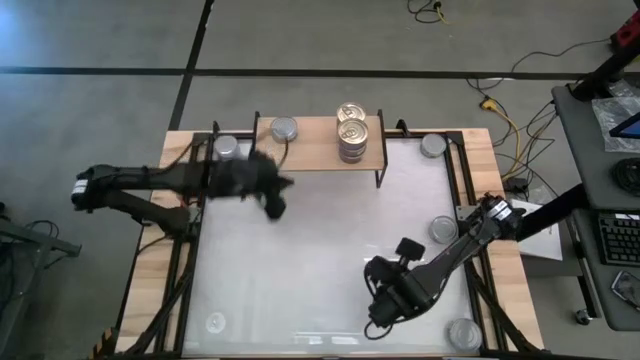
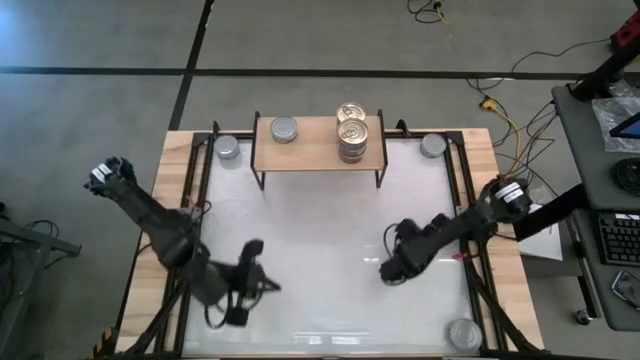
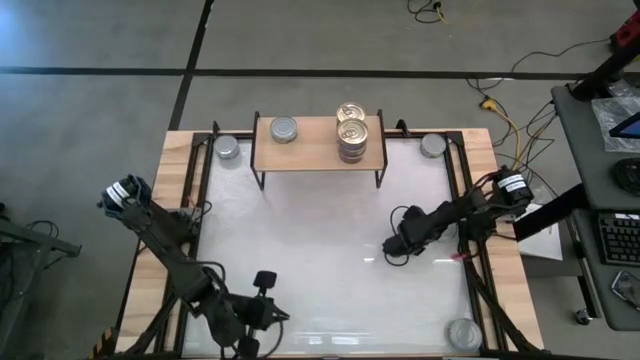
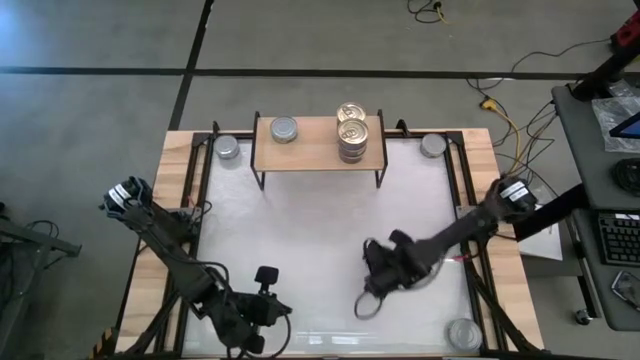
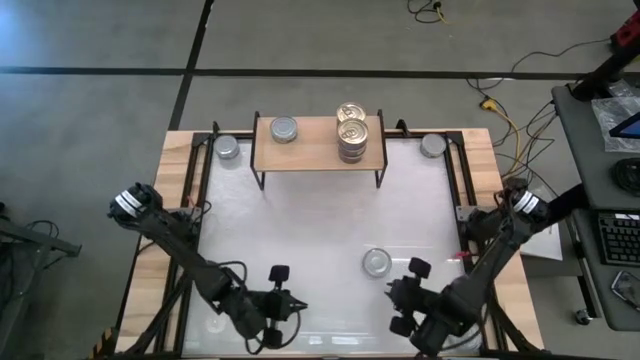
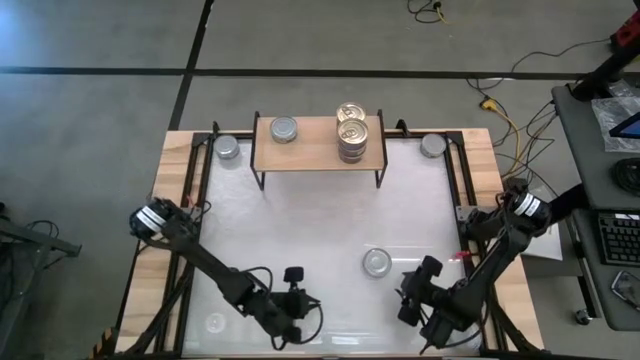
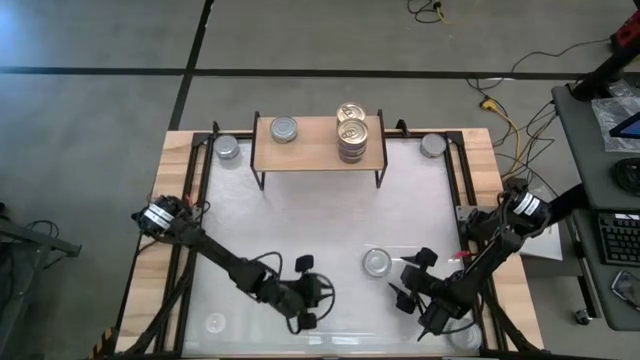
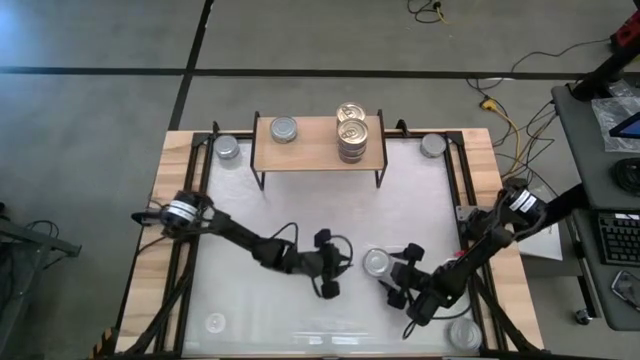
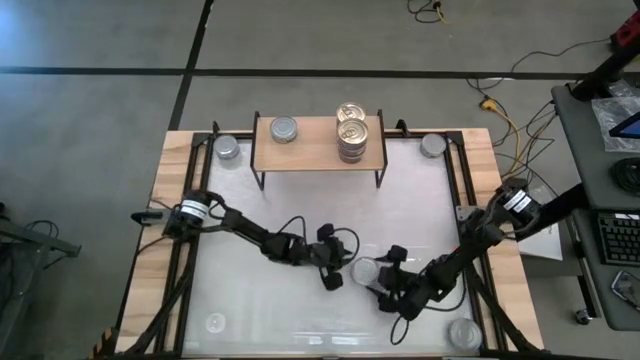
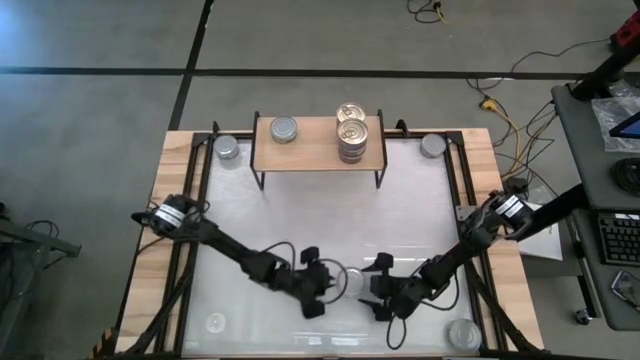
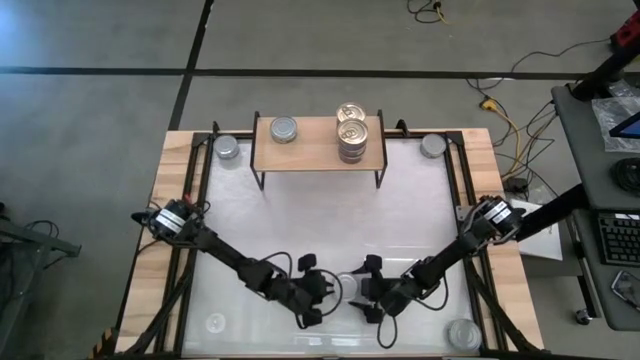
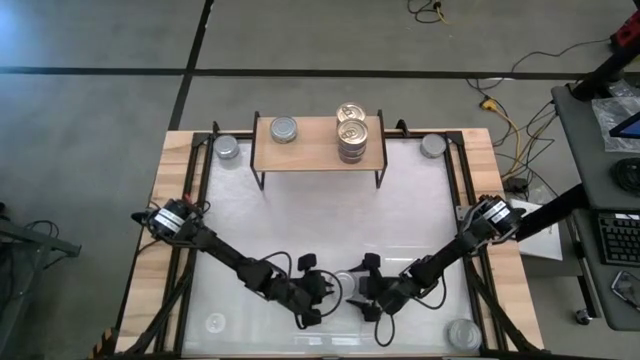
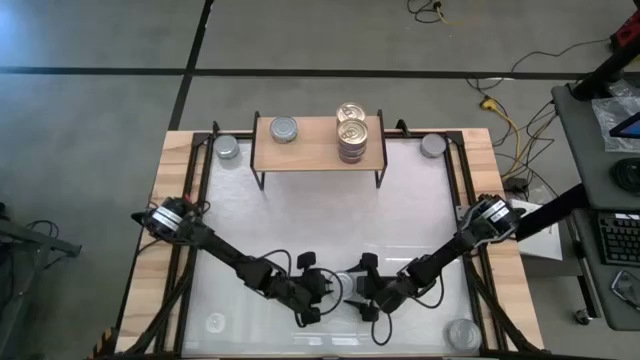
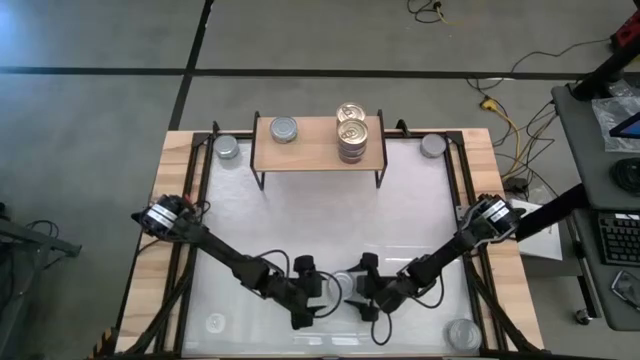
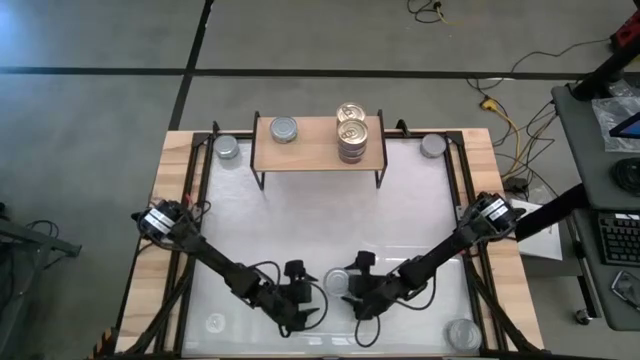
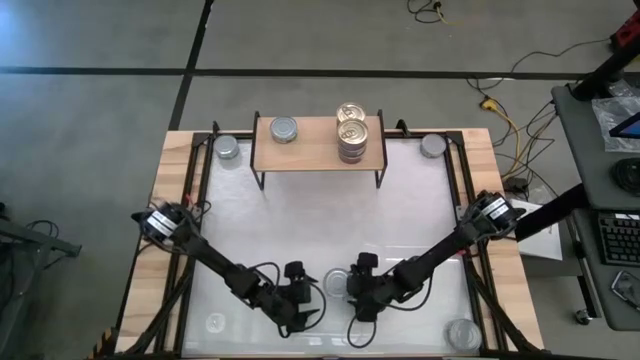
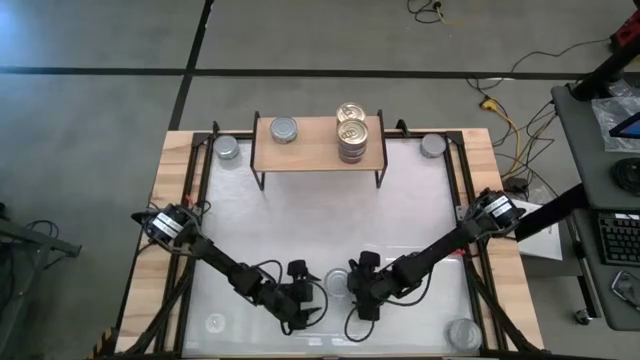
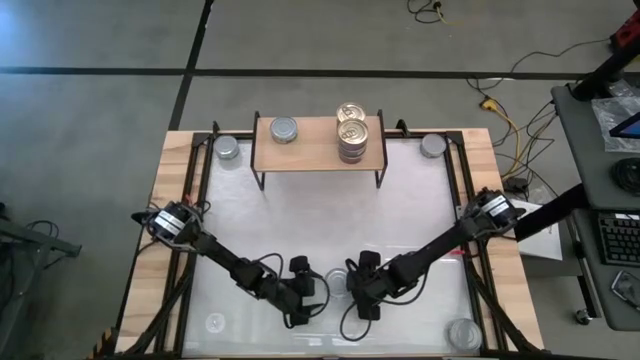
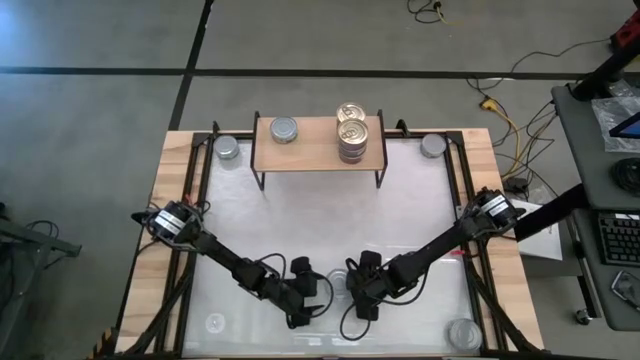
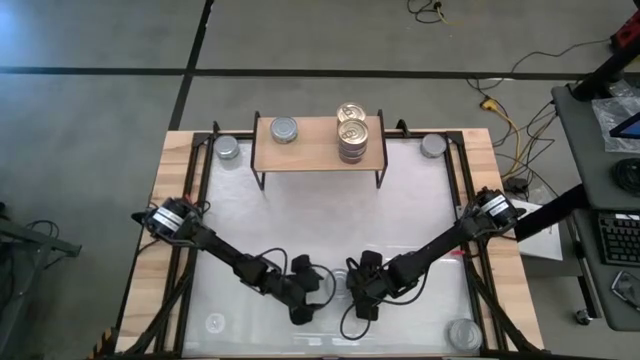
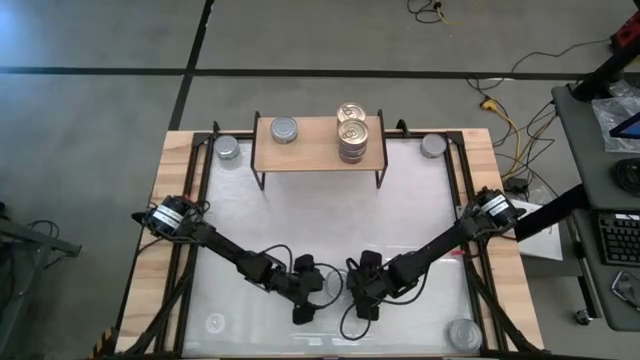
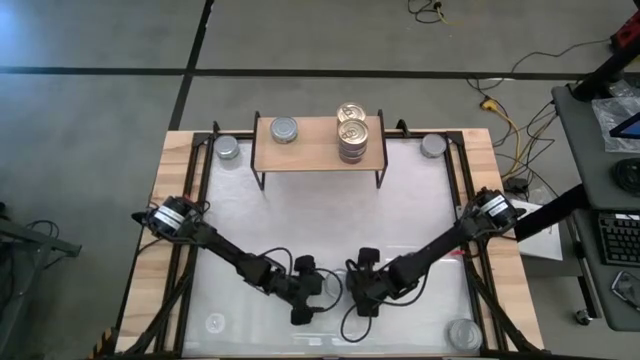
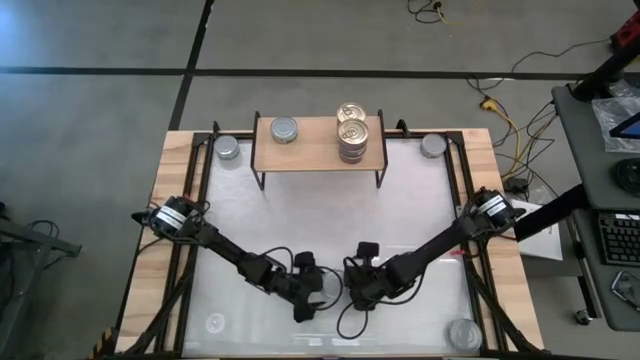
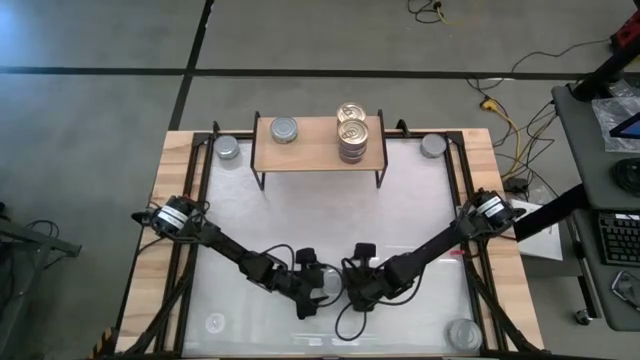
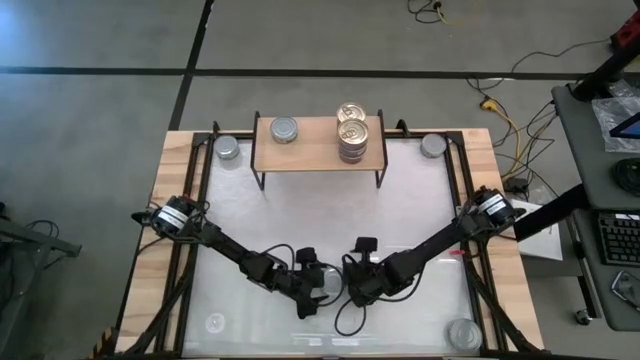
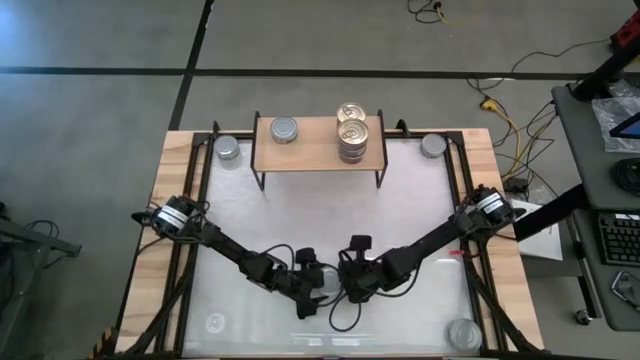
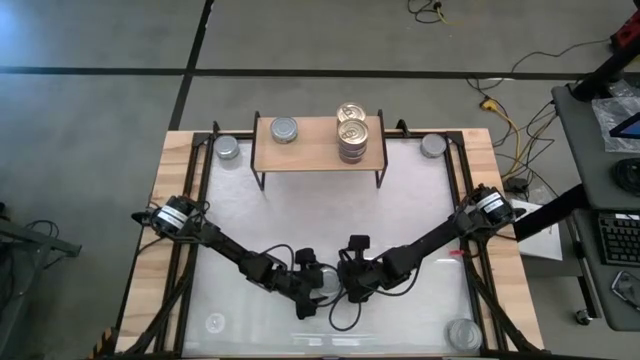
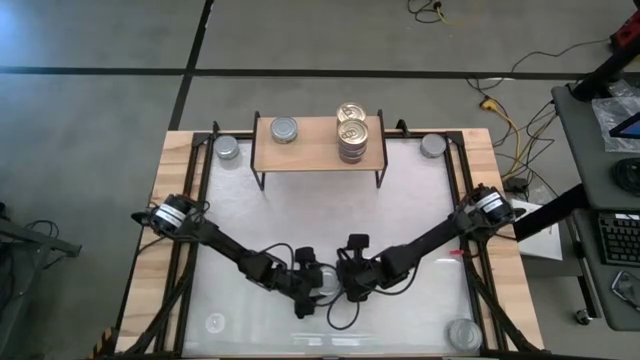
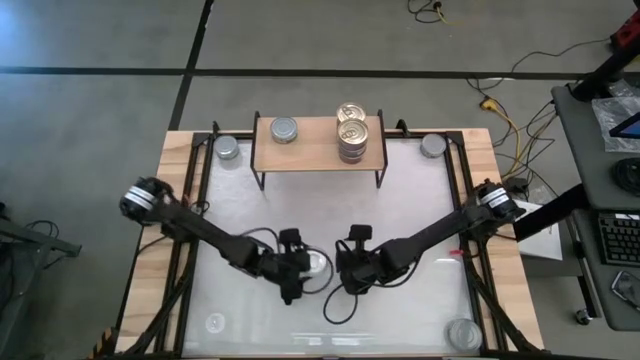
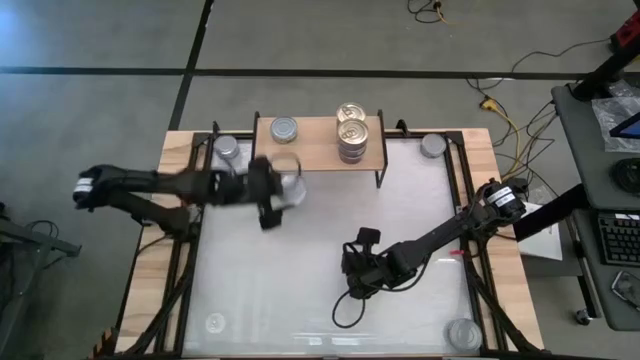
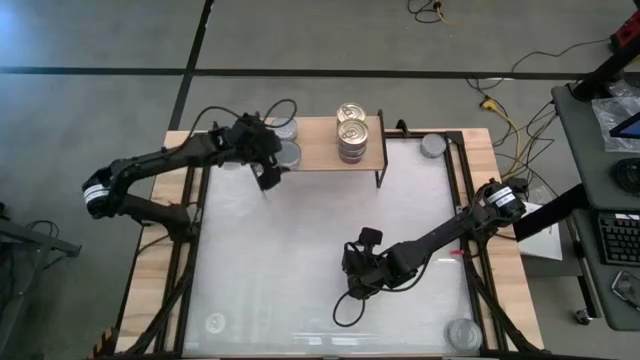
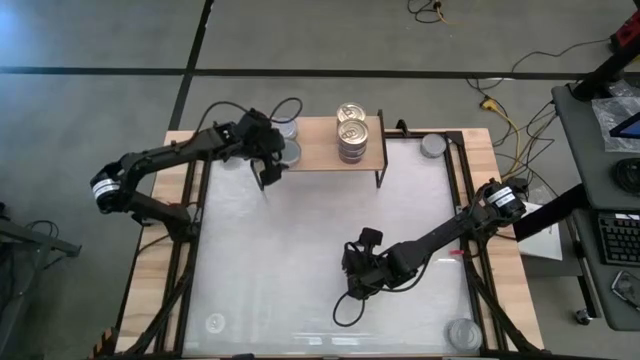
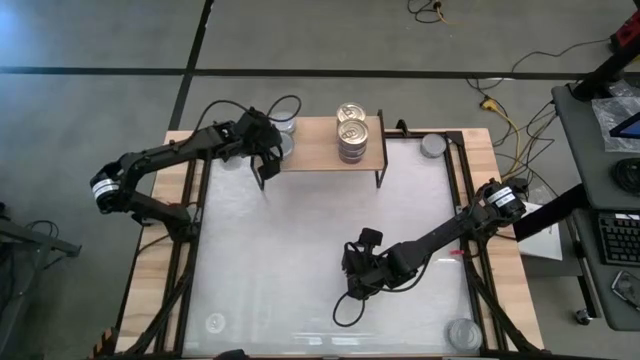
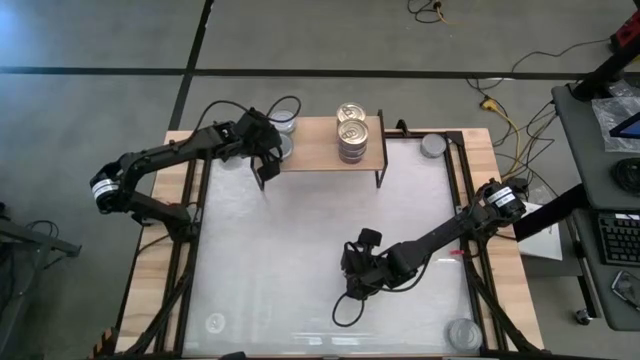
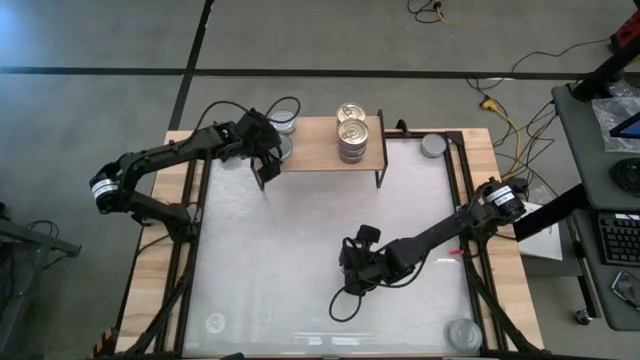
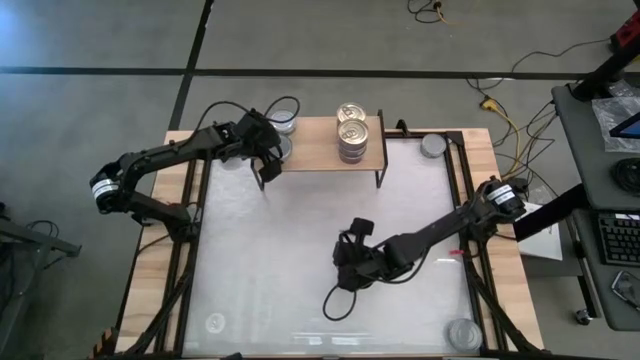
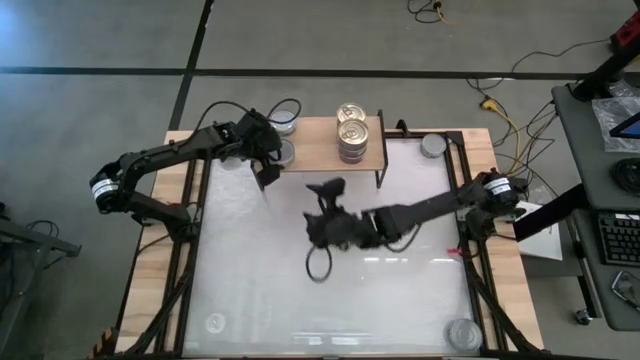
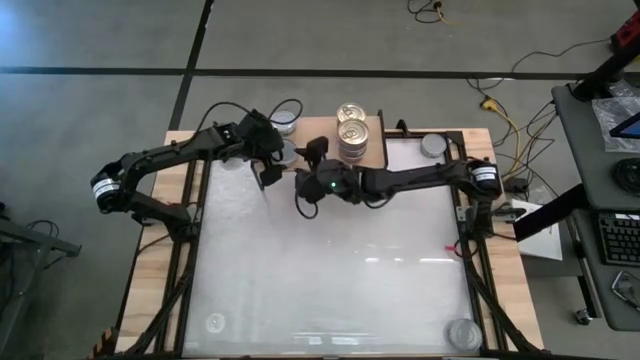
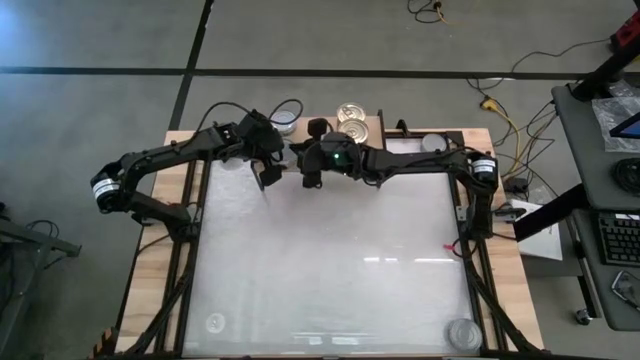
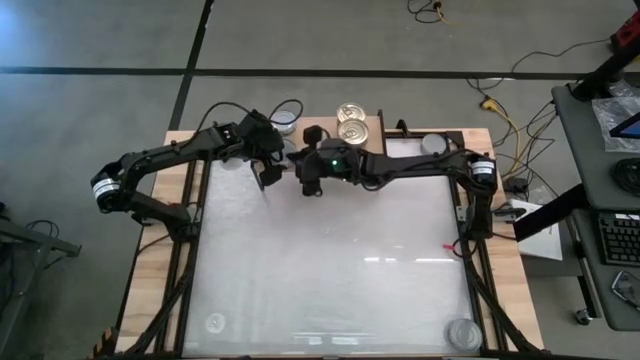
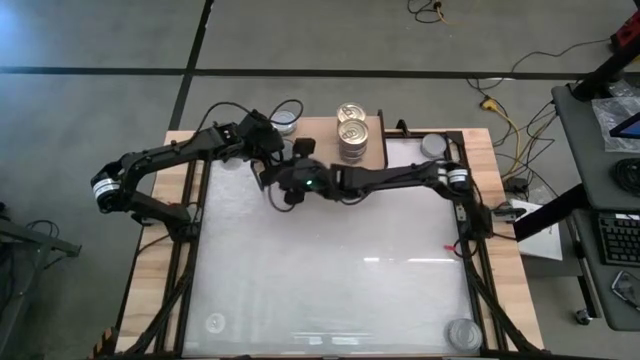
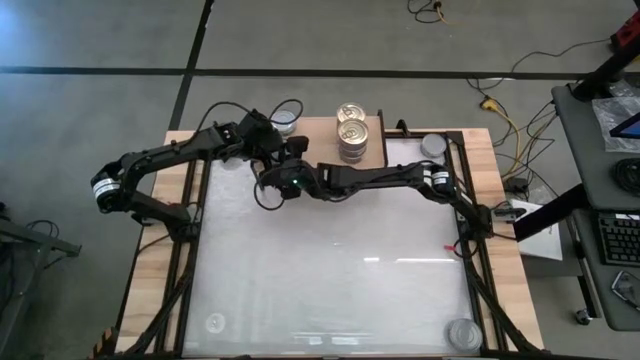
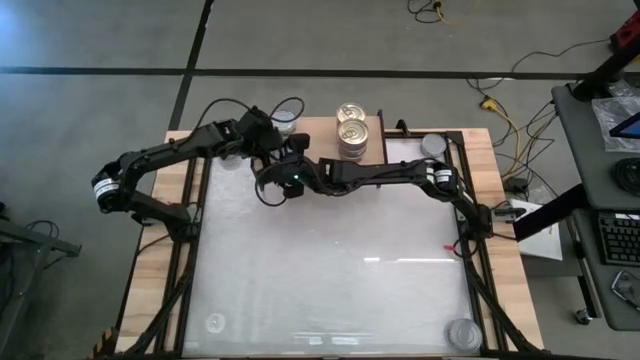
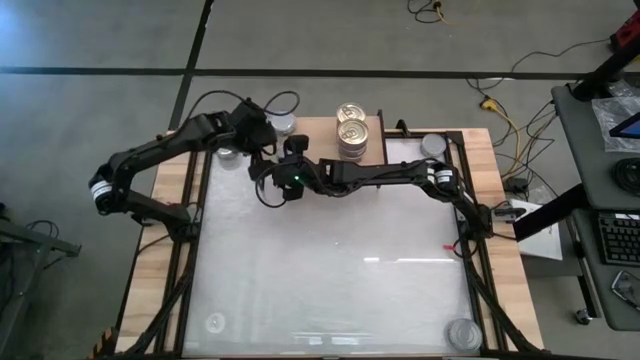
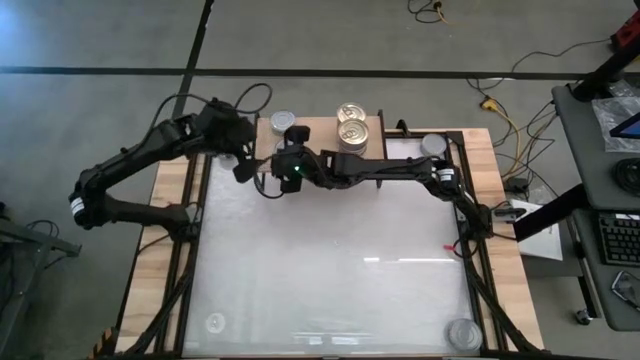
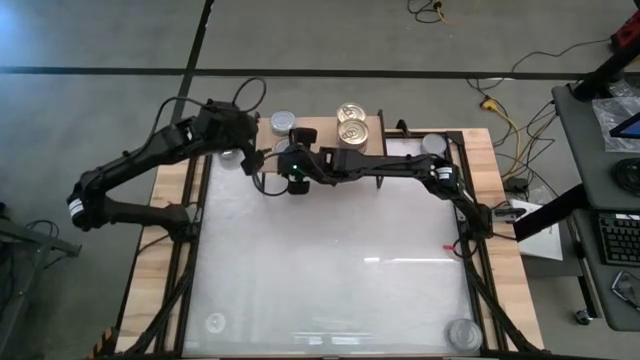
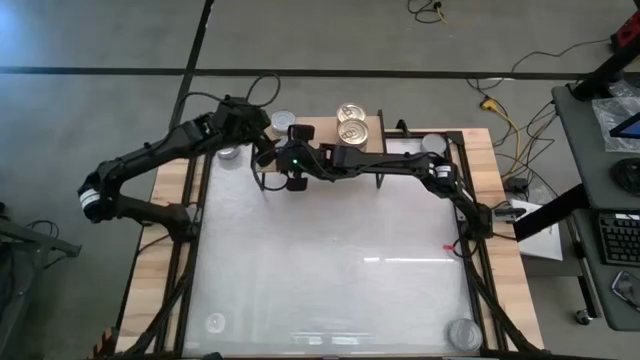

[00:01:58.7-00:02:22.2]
Task: Stack canned seafood by type on shelf
Put the green tuna can on the shelf aligned with the other green tuna can
